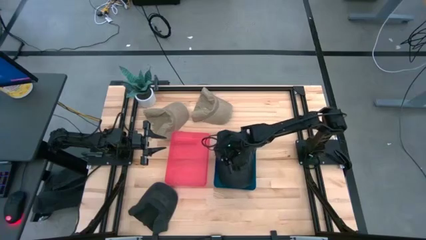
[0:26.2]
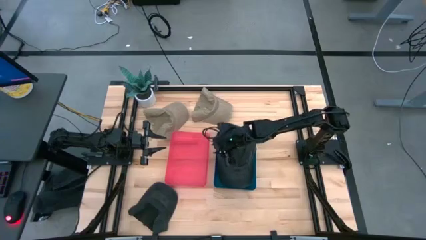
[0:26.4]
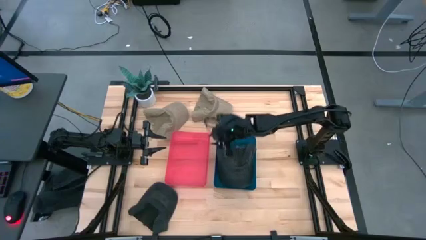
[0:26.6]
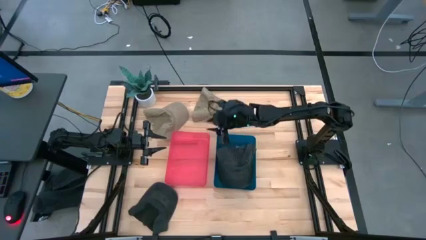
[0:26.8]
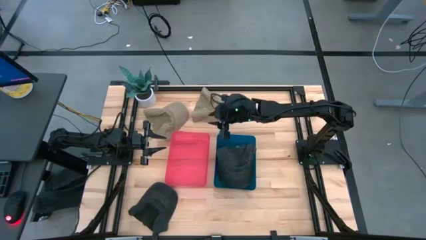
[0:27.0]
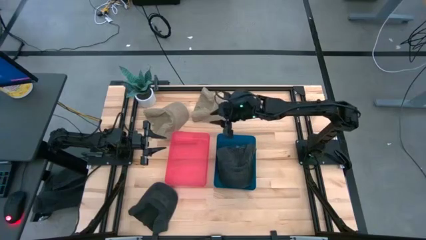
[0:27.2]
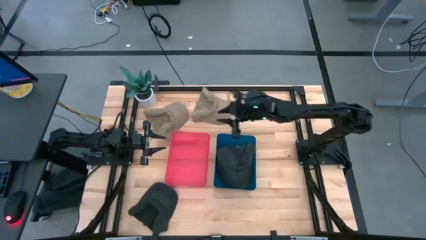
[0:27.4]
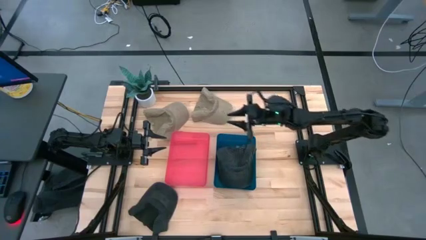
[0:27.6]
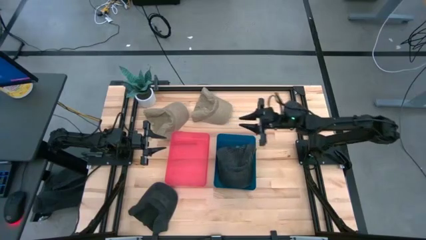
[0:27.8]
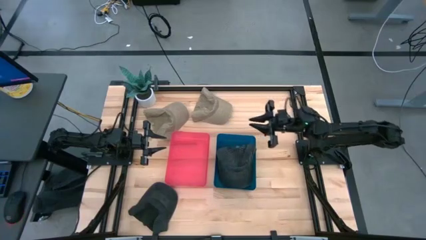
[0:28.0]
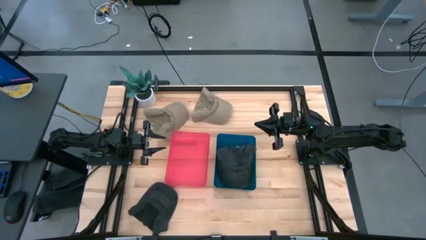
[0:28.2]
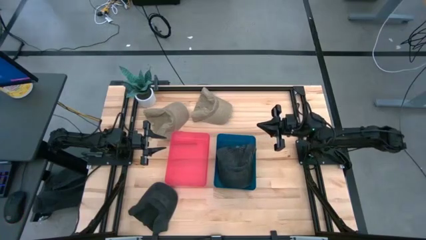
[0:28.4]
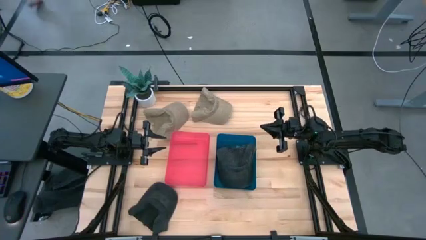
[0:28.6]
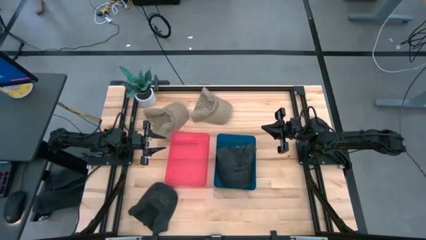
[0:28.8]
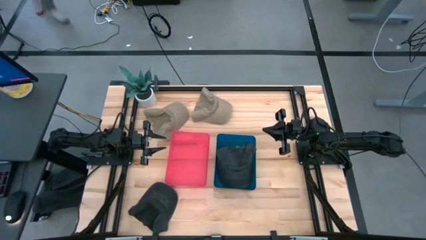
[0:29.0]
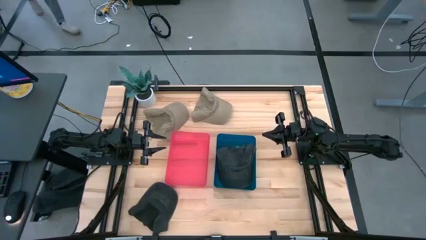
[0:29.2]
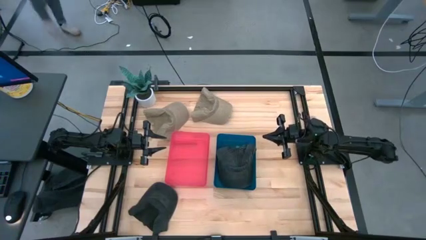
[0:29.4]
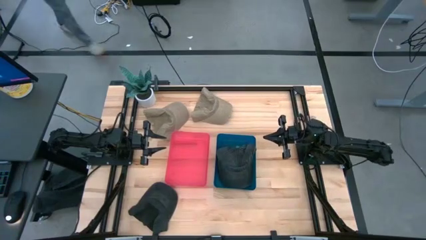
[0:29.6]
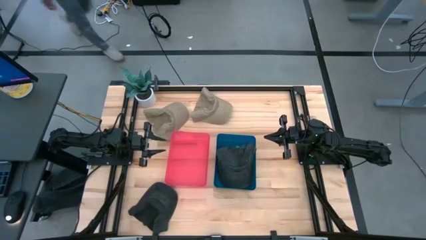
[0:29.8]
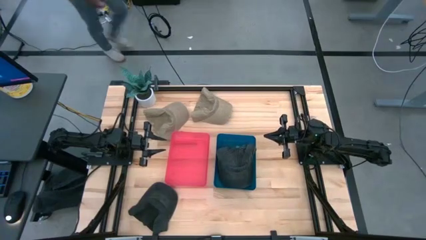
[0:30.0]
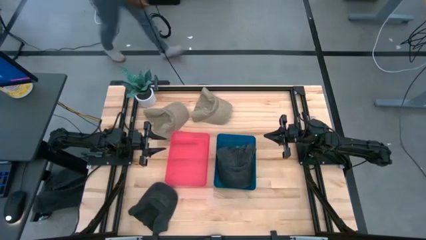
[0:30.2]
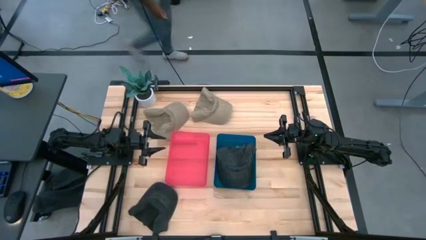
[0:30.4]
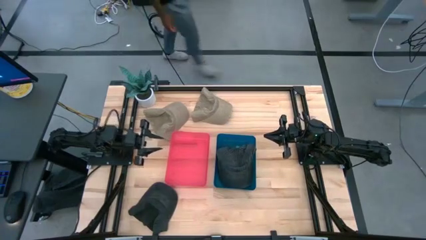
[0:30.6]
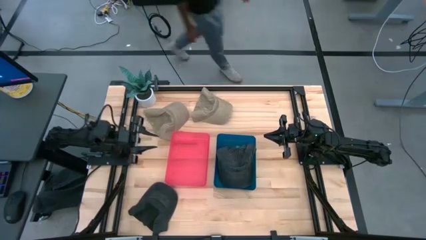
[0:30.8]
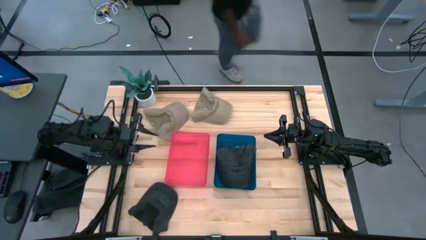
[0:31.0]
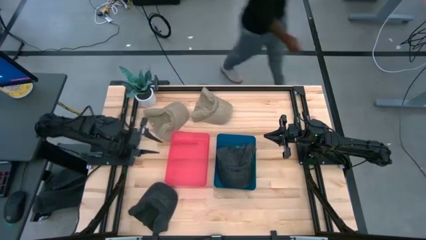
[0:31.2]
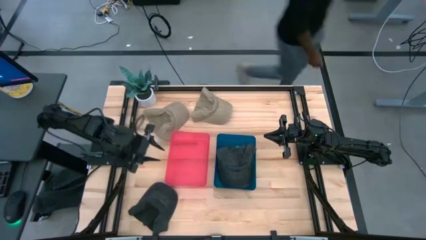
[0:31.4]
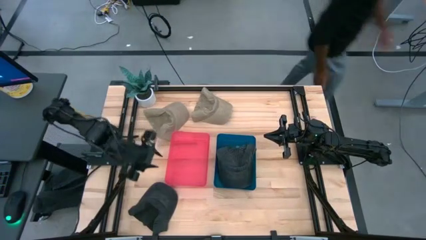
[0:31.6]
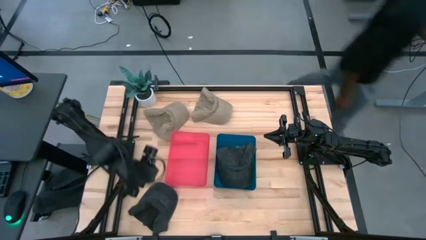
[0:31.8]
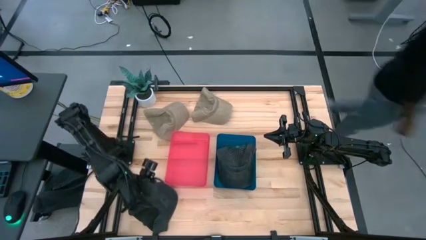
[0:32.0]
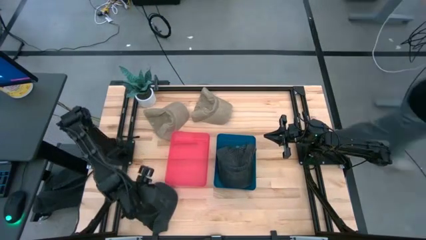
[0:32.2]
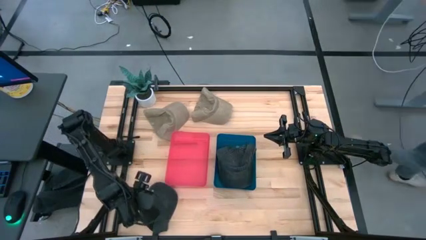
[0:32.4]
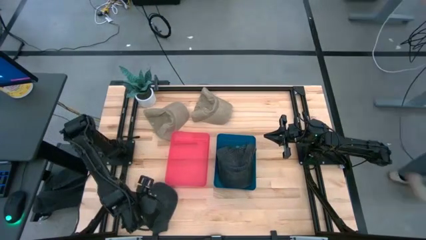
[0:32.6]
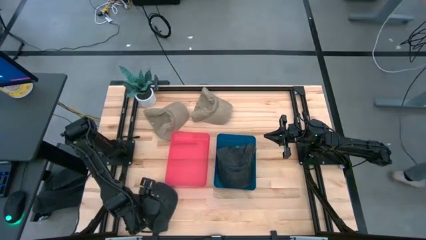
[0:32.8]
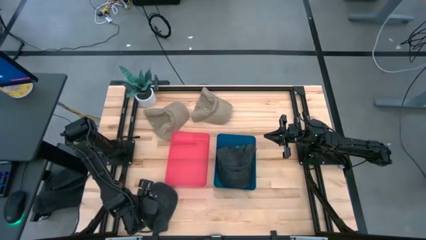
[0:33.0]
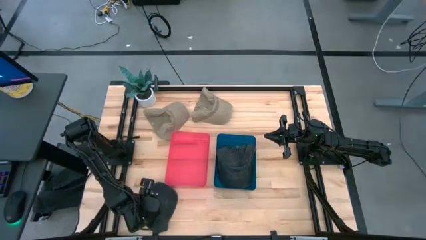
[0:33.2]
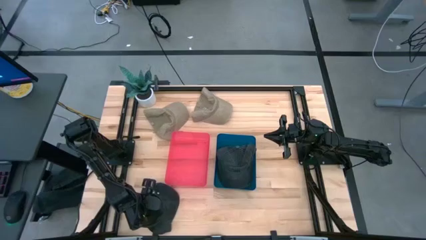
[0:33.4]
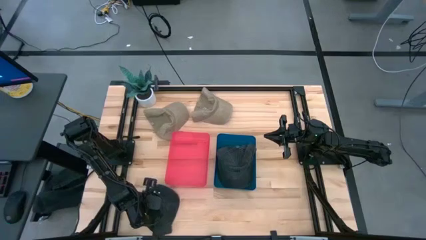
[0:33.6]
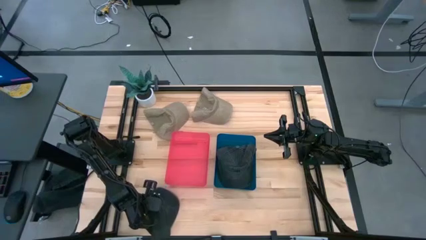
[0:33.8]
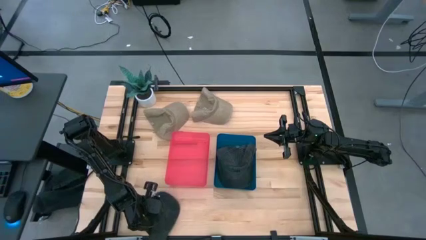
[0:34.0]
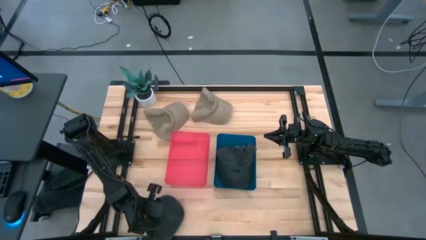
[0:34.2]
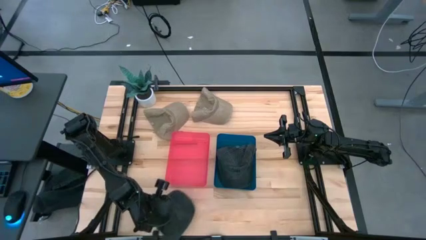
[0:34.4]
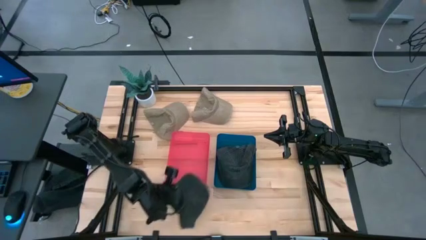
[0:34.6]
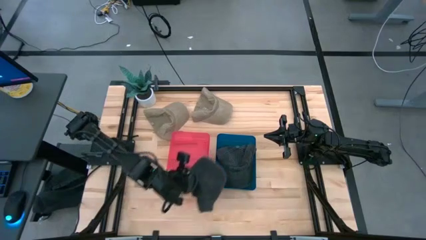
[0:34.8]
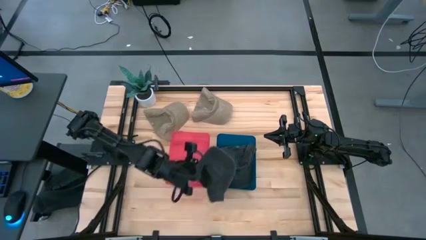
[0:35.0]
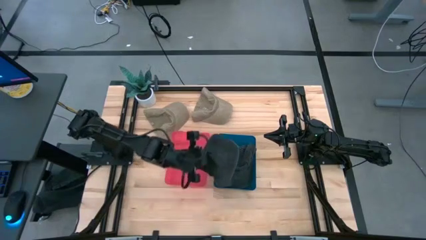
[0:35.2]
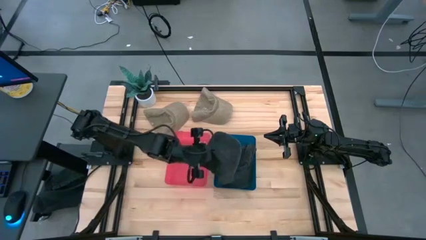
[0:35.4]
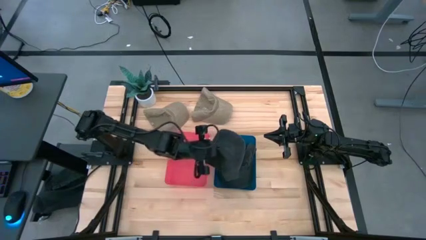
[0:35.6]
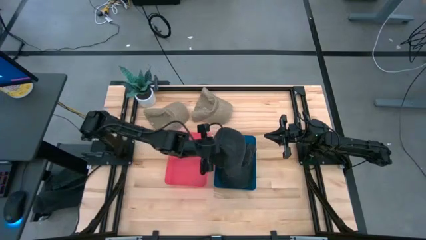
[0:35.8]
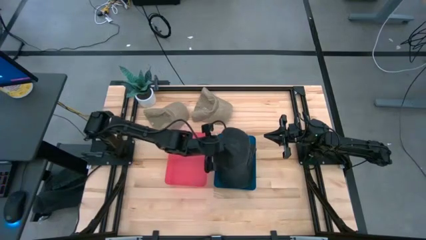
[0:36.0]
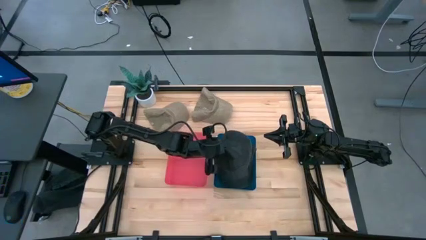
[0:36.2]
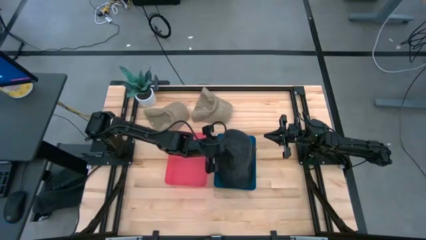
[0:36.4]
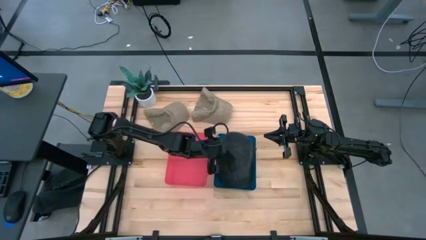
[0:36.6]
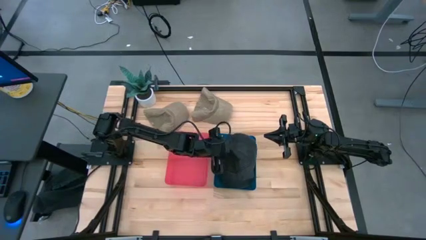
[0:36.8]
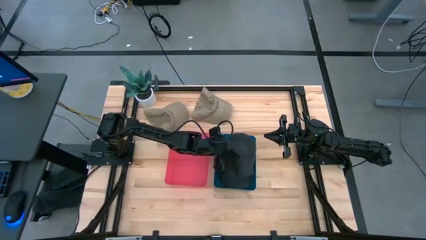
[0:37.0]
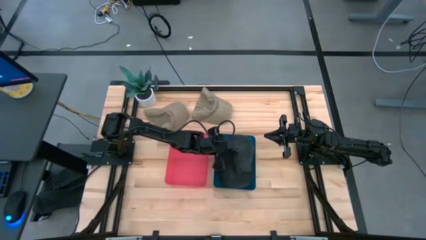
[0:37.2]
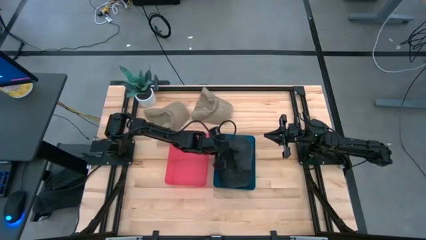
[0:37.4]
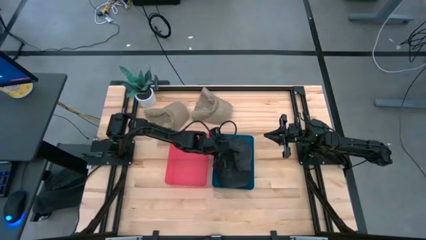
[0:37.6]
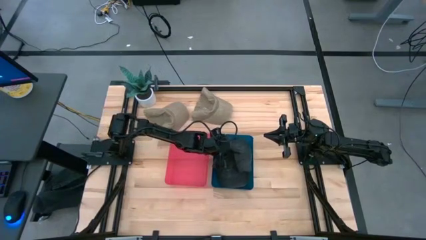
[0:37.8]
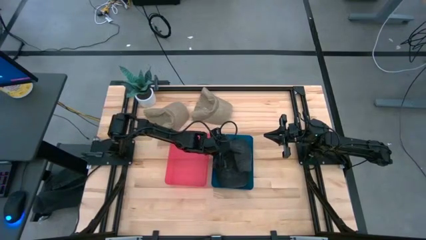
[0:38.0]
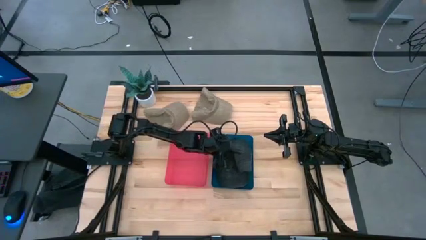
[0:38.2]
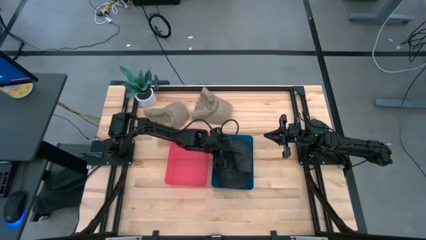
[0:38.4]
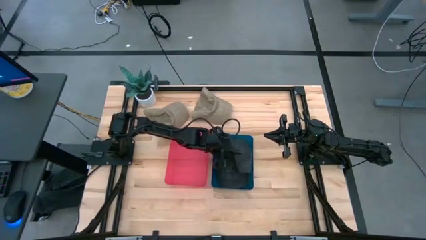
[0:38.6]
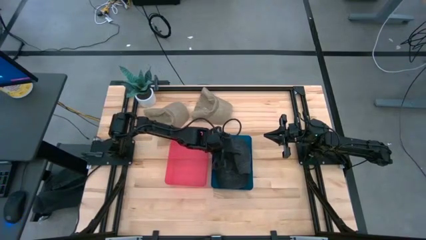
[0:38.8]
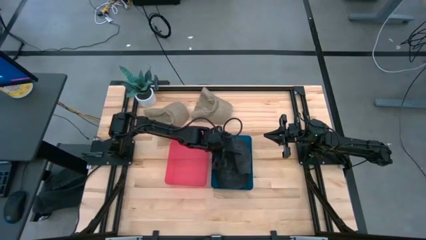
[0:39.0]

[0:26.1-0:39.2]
Task: Pick & Place hat
Put the black cap into the blue bin

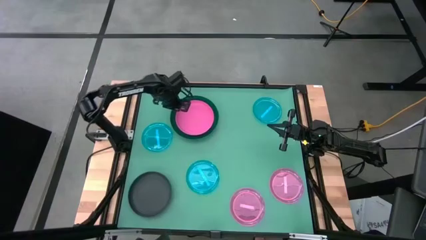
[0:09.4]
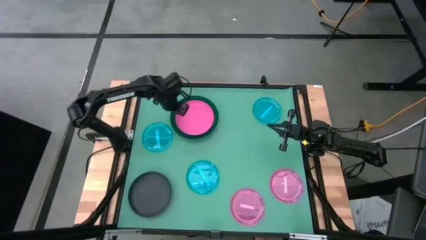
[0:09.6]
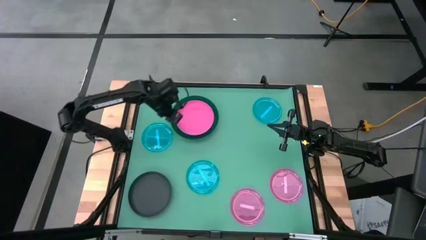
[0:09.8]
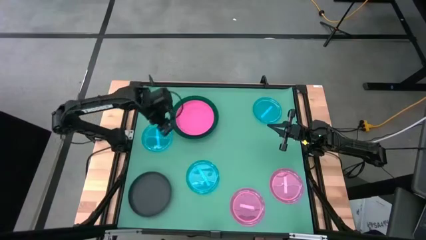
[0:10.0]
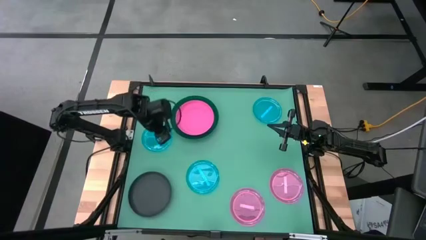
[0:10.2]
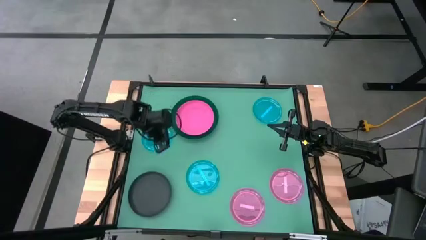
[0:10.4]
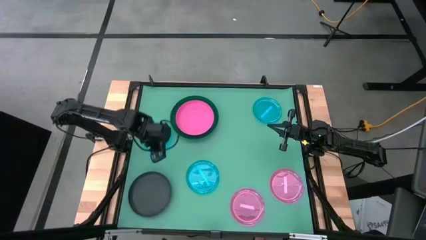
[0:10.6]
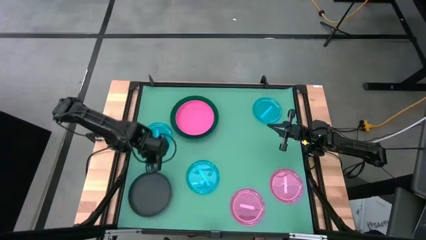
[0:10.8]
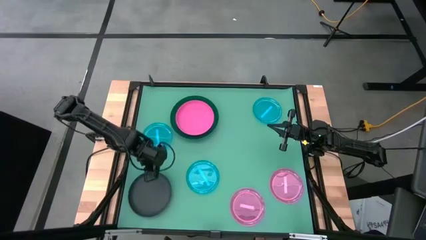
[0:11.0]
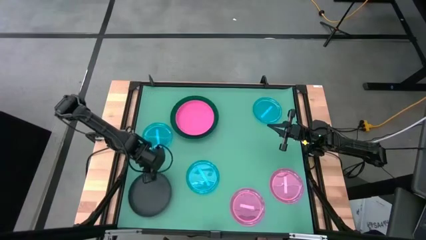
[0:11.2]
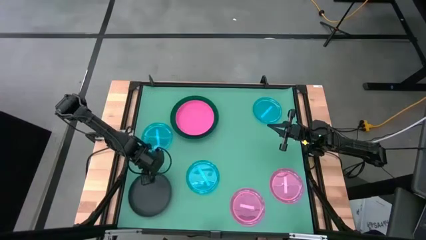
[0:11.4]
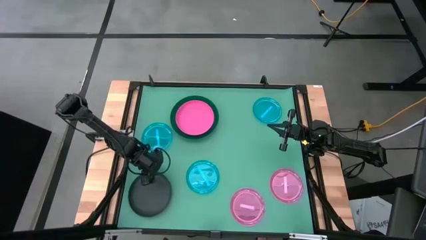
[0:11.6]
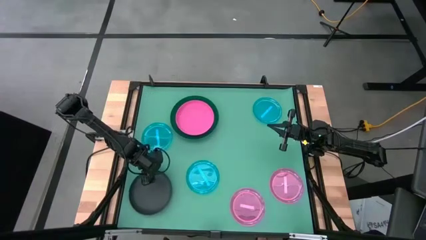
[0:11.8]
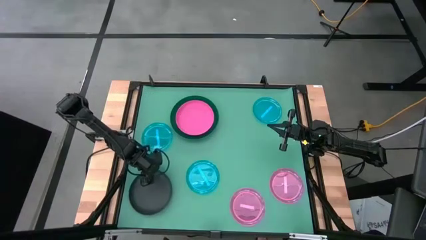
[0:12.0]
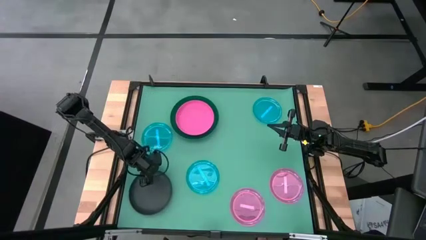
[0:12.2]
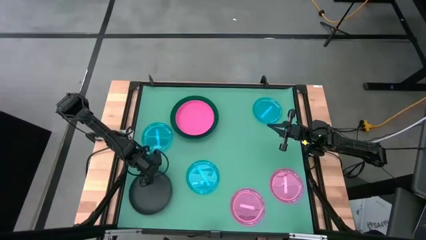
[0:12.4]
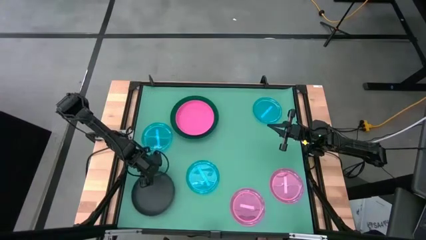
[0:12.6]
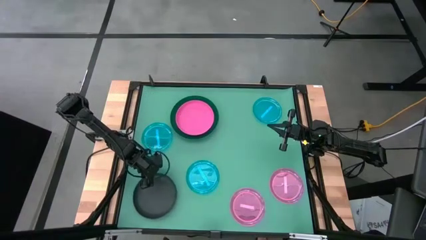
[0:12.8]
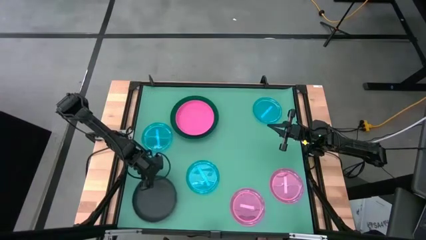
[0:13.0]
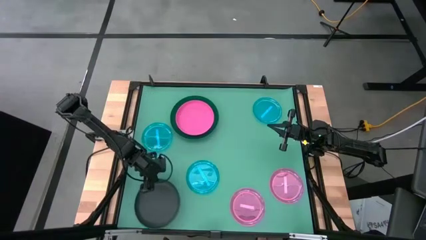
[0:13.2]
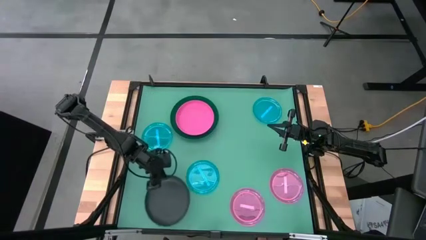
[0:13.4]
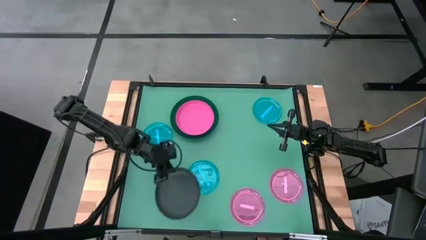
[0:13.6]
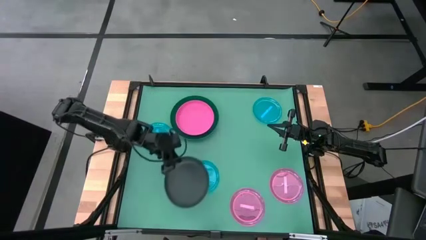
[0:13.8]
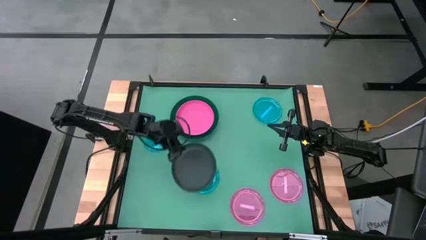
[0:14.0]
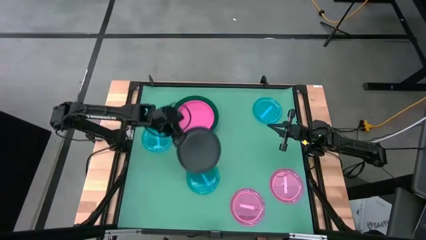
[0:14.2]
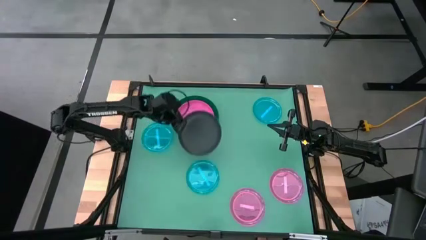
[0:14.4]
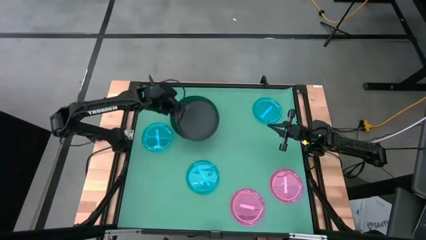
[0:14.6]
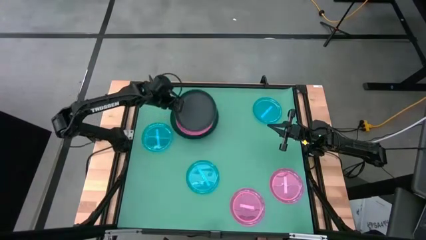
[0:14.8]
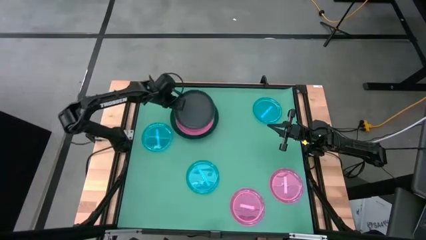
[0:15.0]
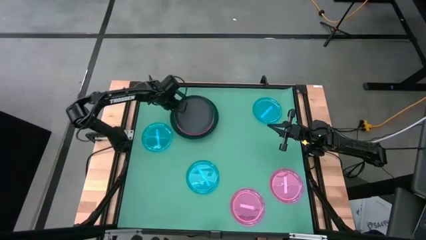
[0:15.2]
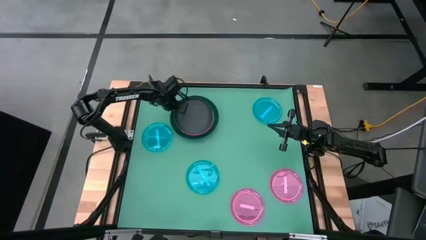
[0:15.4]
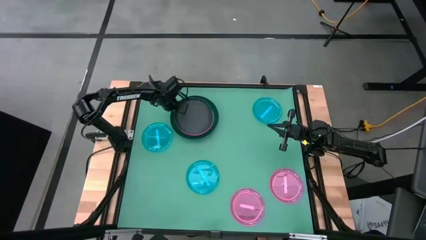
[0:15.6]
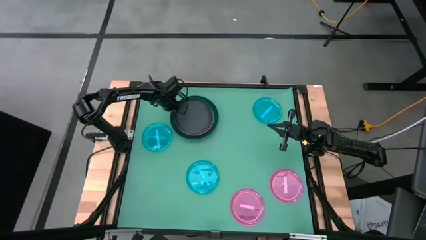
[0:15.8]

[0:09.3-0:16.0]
Task: Stack plastic plates
Stack the black plate on top of the pink plate
